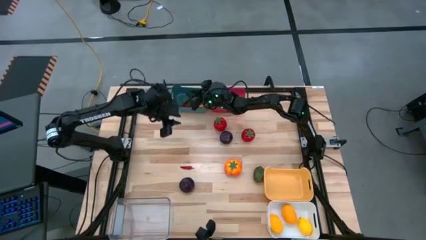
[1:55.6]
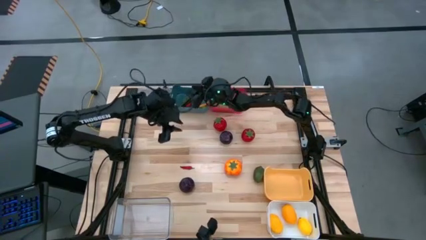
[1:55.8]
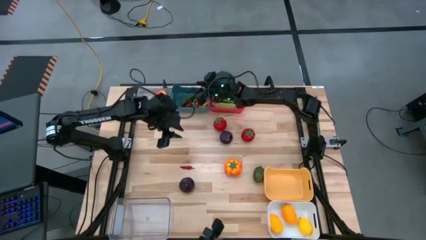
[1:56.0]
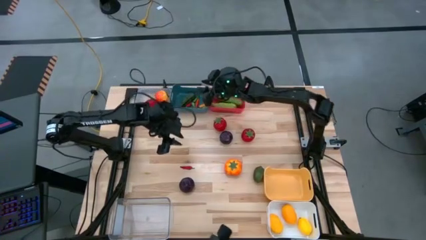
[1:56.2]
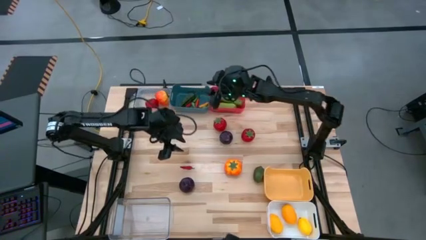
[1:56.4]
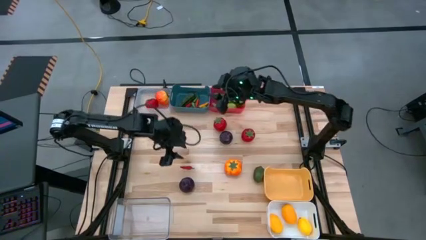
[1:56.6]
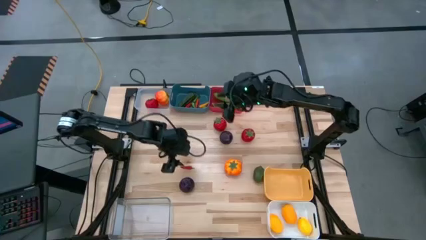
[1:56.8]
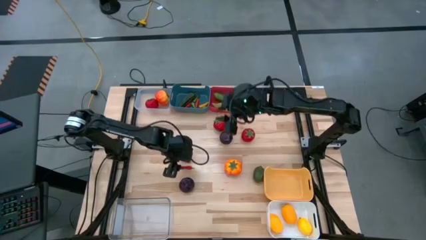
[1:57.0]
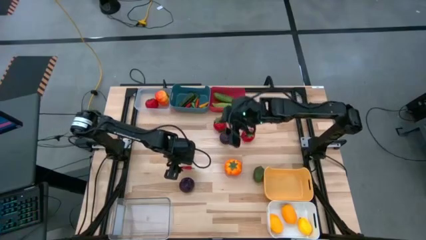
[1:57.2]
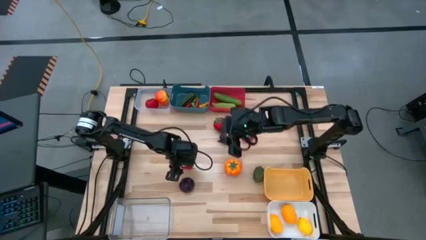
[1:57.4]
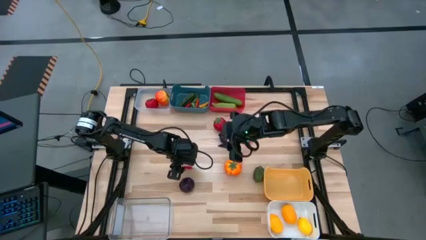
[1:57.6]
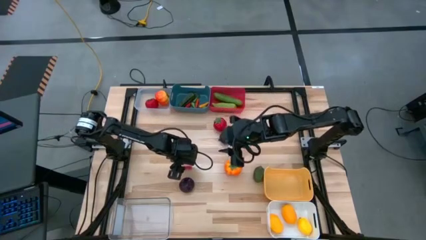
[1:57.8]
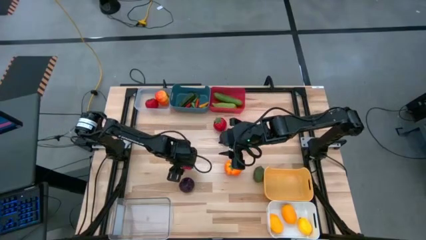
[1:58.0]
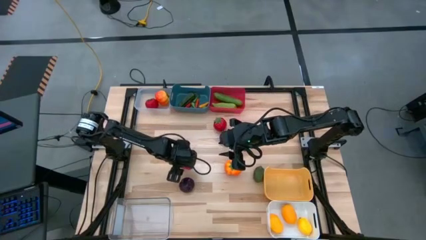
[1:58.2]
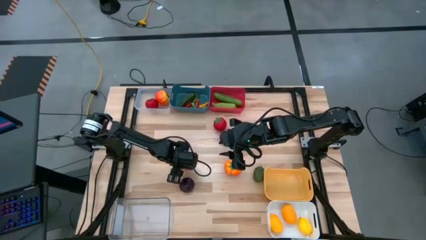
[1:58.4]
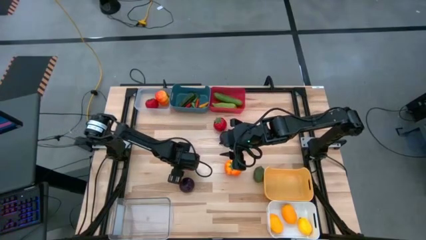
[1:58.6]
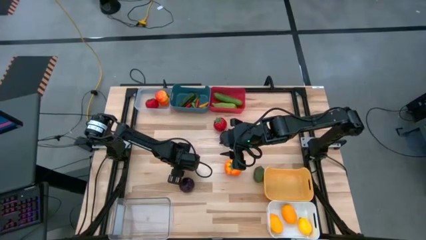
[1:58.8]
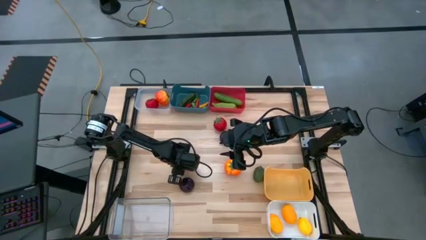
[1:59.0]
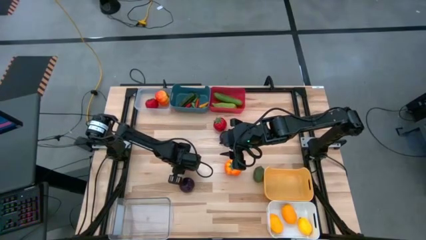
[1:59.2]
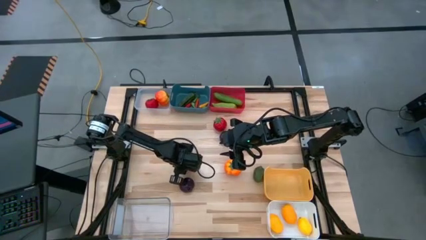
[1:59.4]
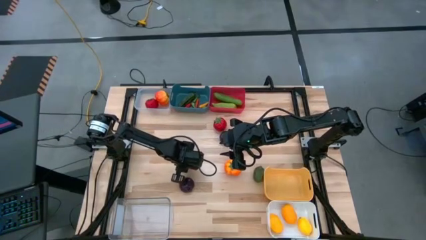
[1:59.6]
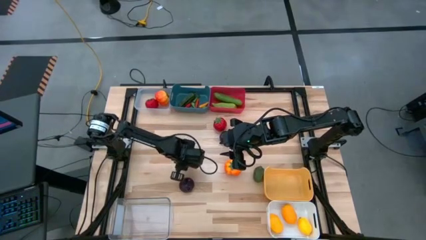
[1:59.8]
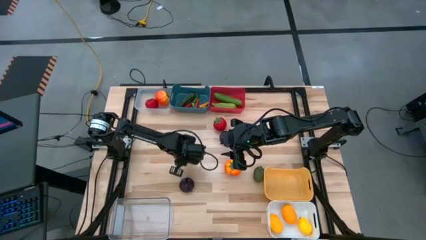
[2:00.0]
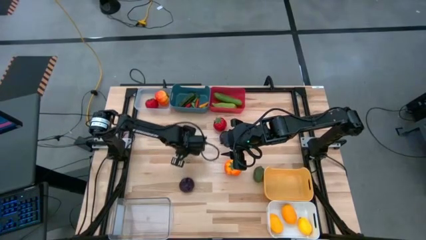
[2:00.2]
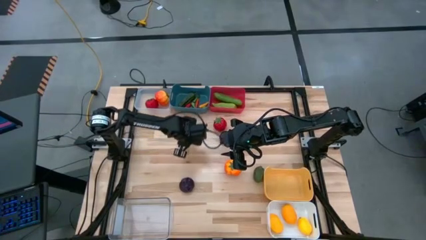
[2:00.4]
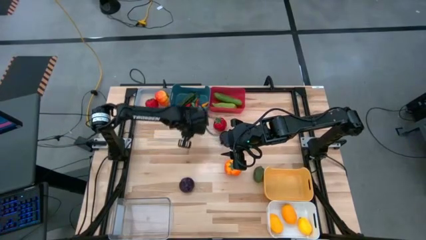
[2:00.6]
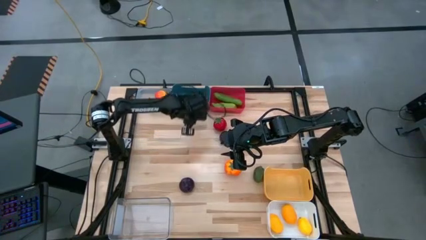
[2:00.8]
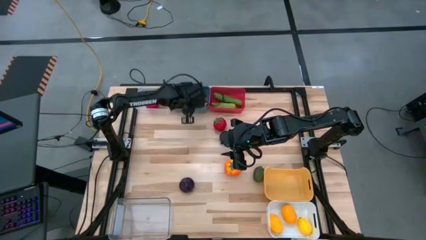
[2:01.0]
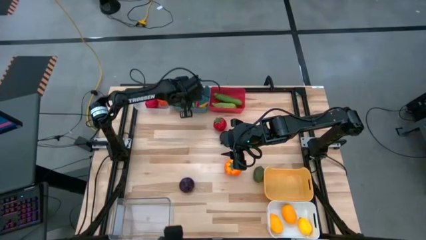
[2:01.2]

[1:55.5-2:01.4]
Task: Sort produce into baskets
Put the red chili pepper into the blue bin

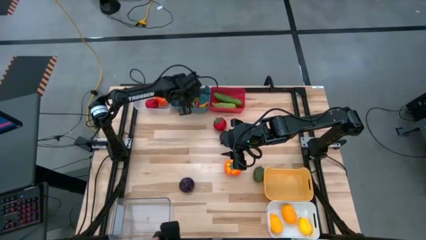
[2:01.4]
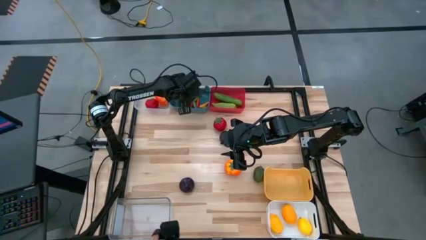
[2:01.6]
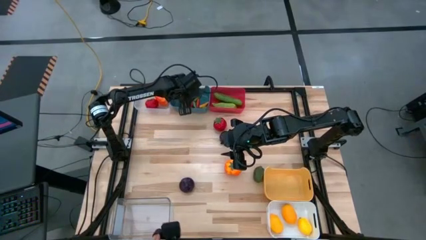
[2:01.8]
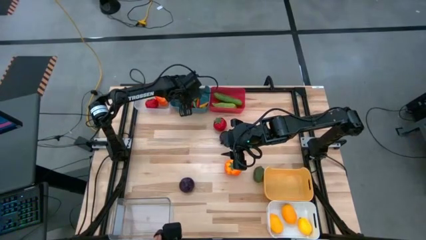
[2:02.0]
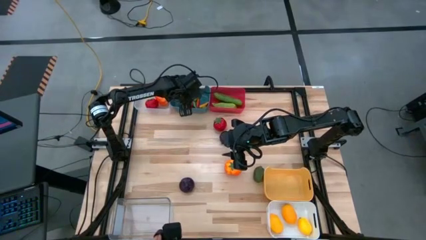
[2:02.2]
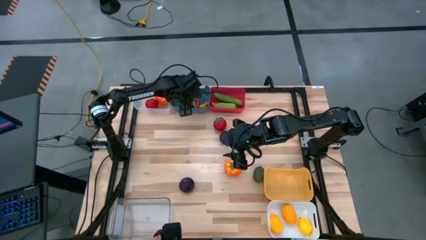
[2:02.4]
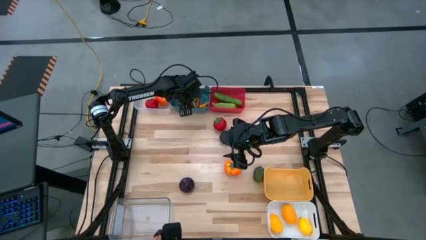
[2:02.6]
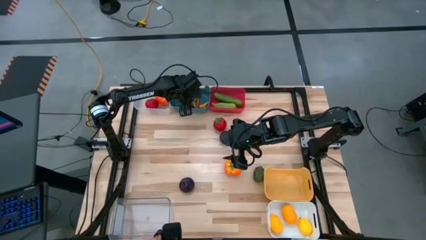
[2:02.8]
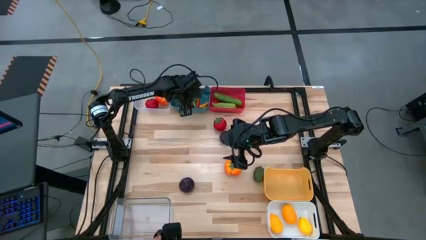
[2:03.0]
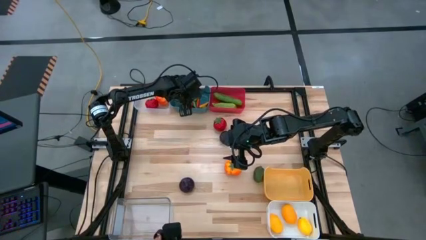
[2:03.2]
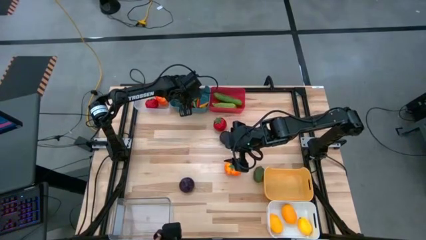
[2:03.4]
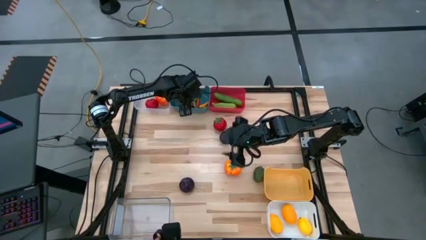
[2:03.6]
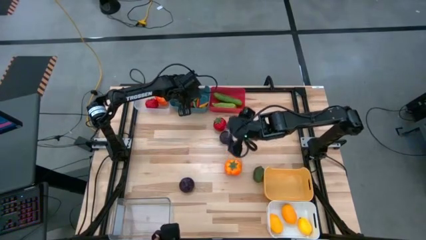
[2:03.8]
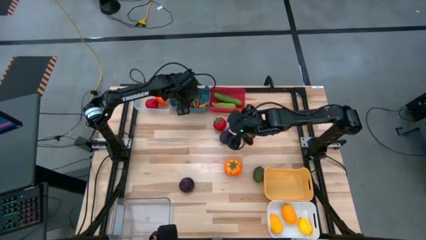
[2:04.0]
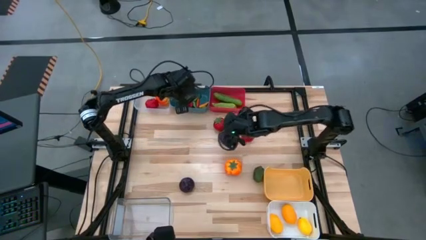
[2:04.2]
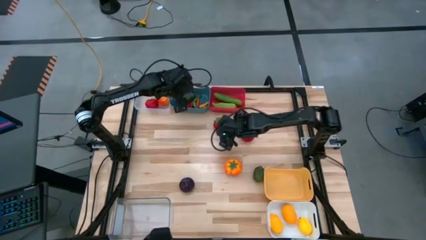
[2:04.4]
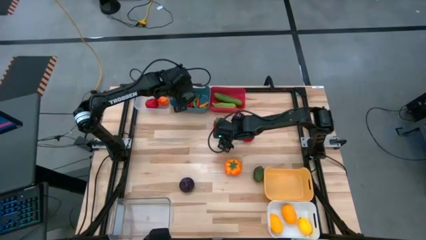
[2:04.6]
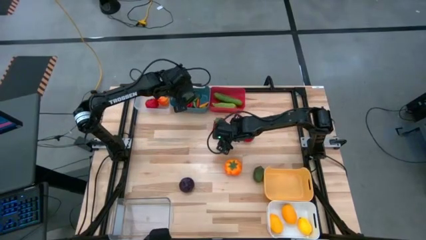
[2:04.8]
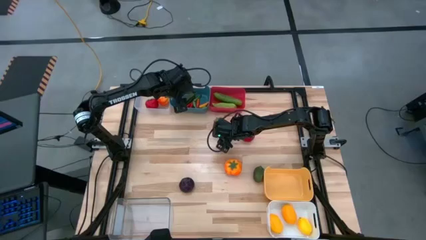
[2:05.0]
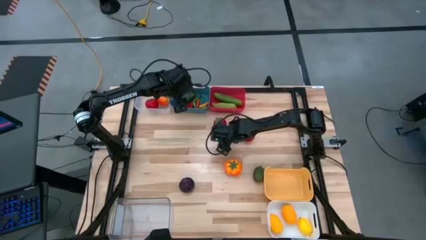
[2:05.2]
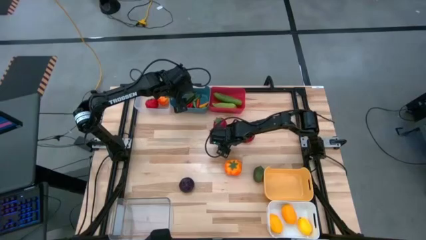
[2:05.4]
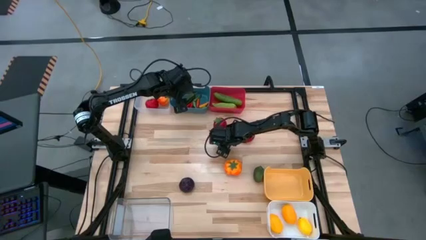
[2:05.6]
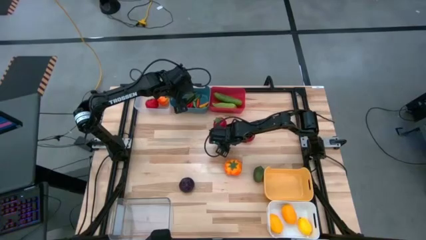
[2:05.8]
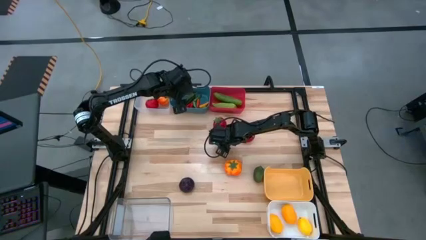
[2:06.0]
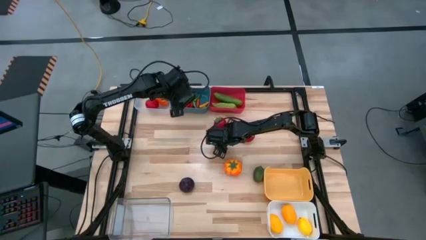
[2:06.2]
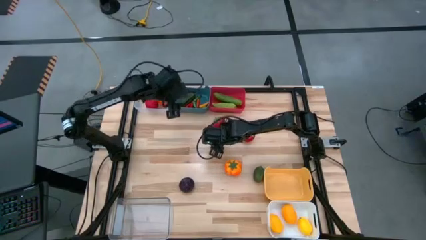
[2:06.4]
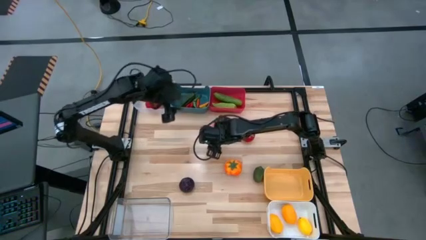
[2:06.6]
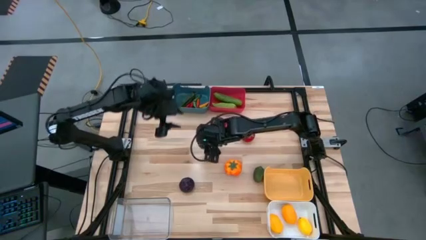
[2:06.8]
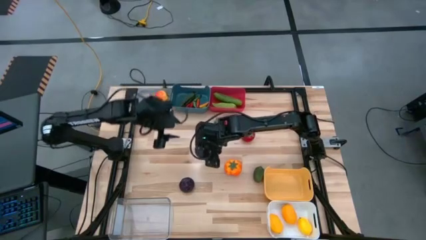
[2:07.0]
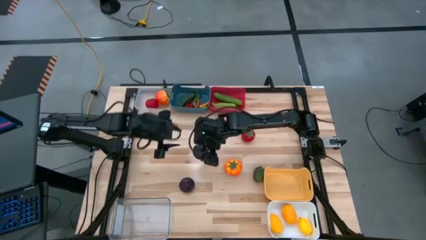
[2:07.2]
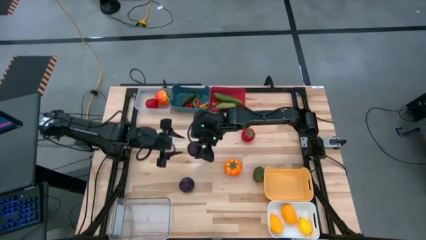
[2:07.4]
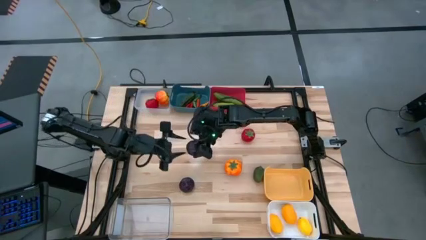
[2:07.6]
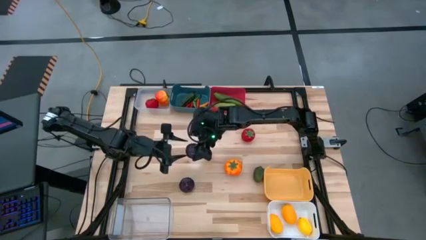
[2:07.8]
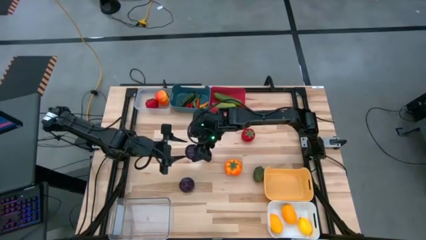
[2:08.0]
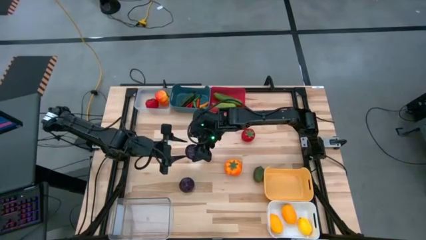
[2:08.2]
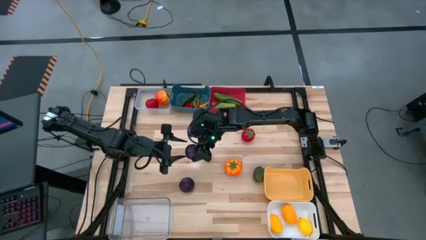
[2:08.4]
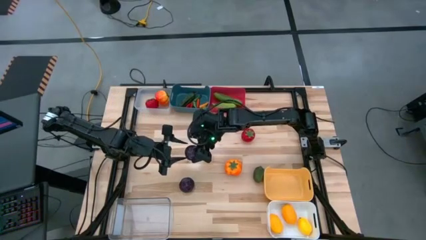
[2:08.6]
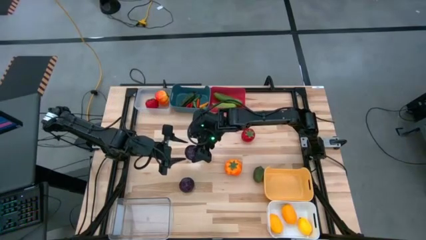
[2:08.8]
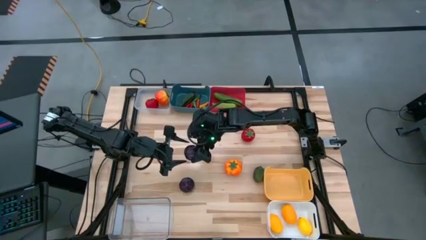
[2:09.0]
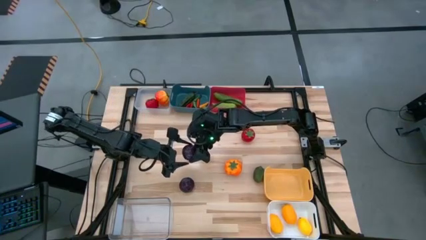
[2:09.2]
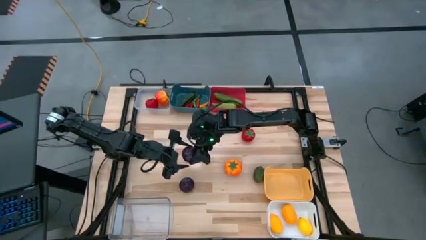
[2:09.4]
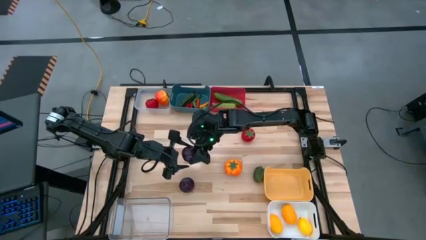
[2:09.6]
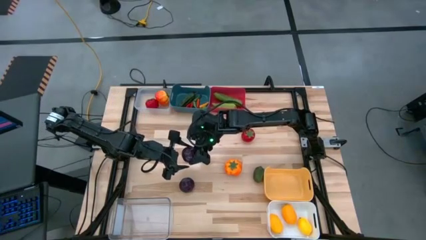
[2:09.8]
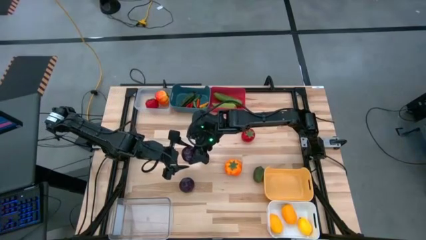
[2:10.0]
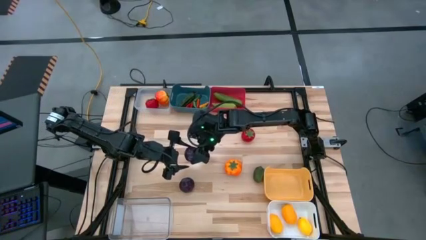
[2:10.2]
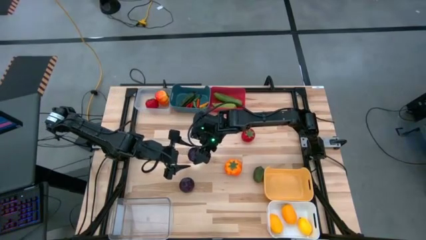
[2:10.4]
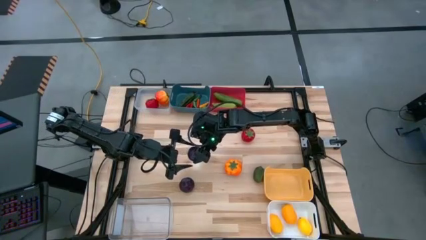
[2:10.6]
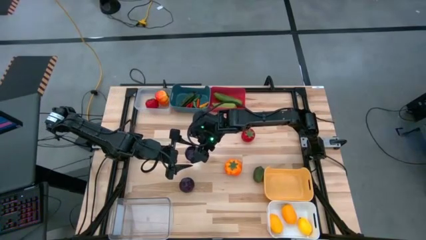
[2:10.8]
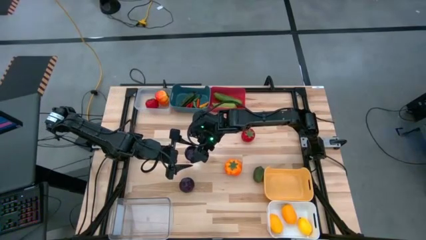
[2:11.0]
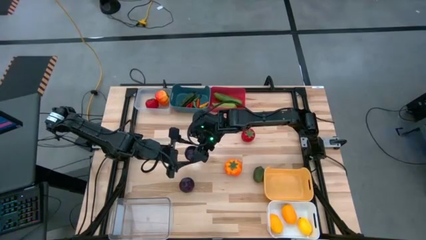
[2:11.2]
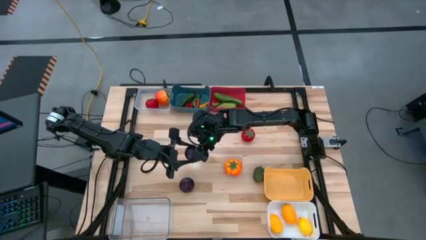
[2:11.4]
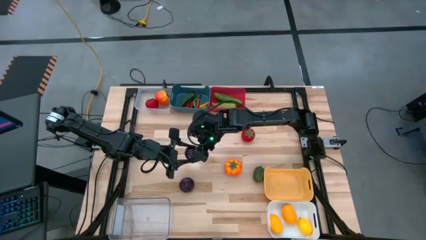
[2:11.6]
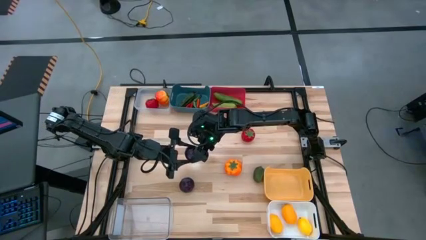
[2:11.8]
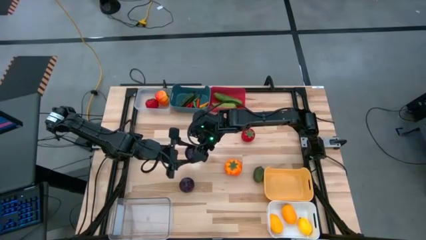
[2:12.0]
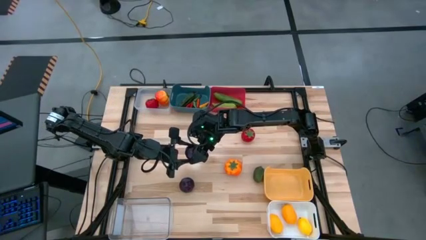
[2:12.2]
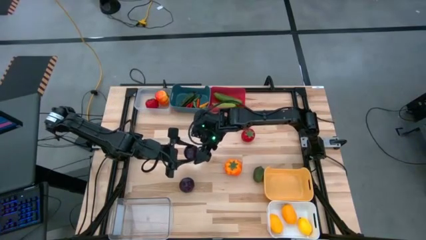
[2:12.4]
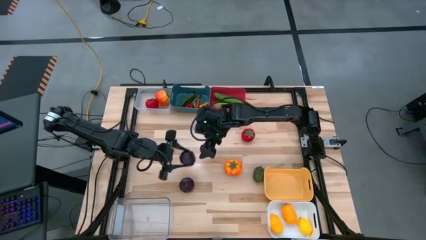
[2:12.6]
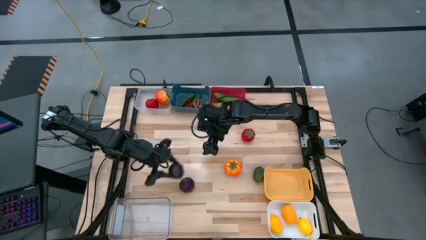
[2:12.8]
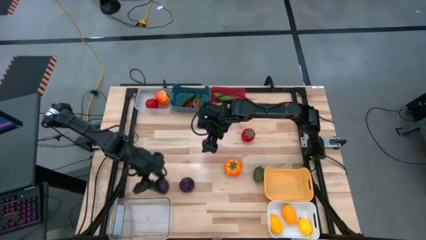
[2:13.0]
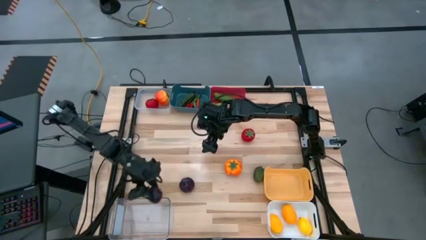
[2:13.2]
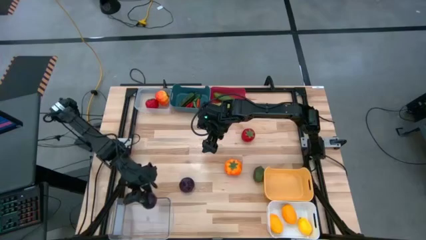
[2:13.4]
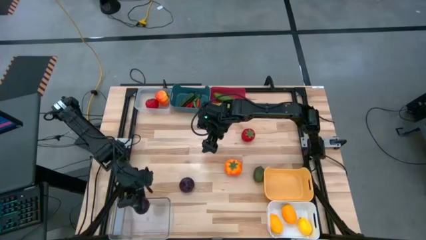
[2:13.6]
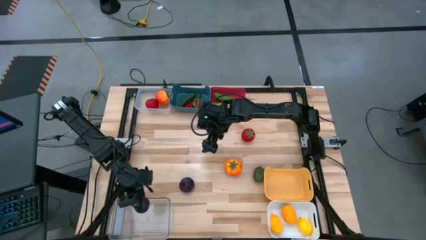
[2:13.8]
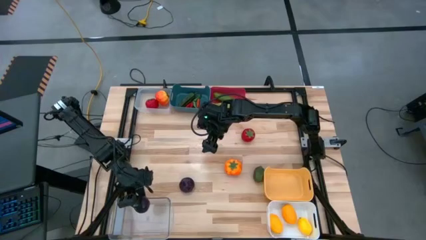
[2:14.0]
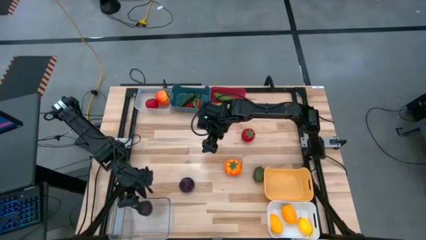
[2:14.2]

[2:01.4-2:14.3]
Put the plum into the bottom transparent bin
